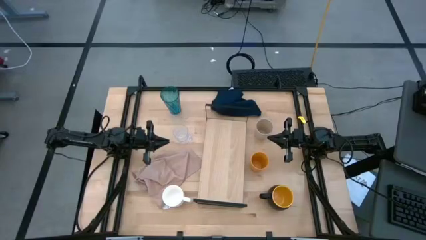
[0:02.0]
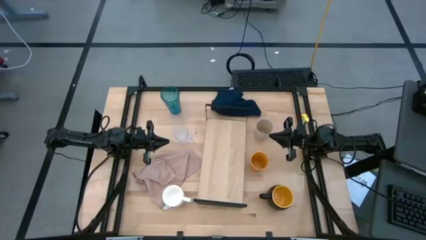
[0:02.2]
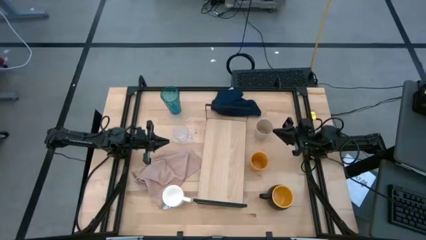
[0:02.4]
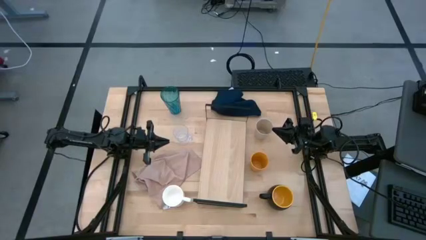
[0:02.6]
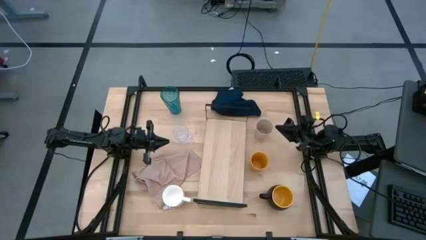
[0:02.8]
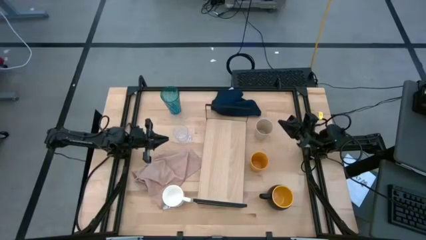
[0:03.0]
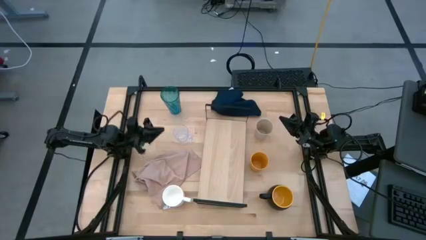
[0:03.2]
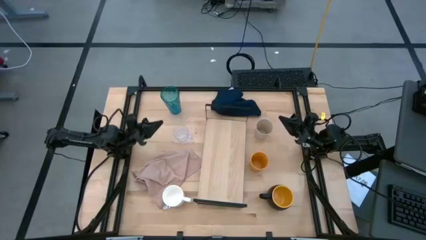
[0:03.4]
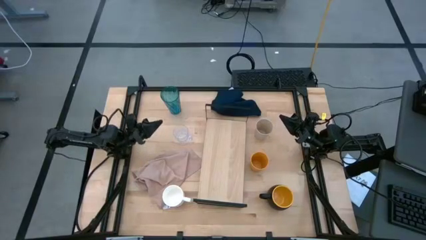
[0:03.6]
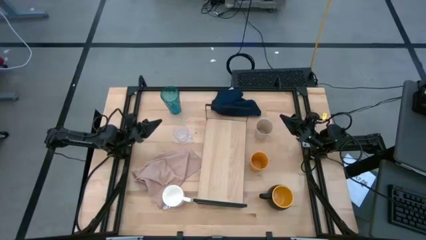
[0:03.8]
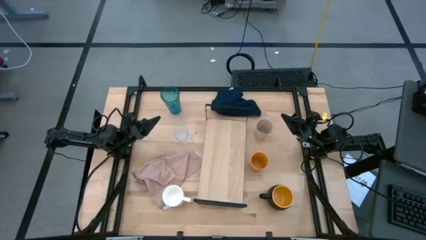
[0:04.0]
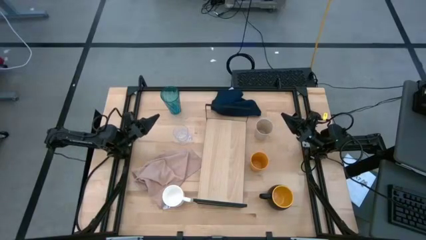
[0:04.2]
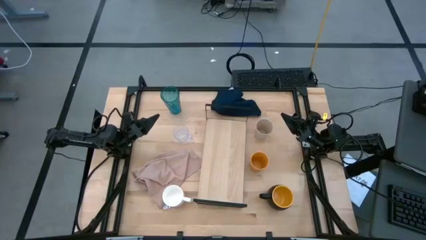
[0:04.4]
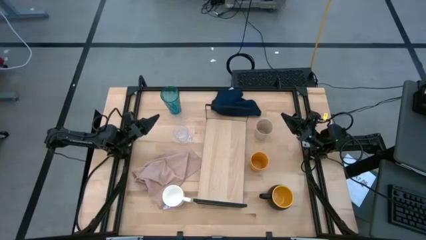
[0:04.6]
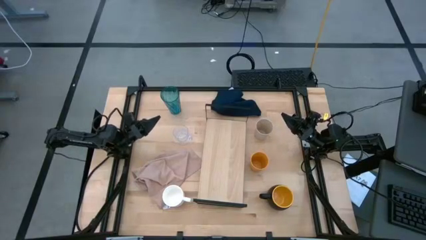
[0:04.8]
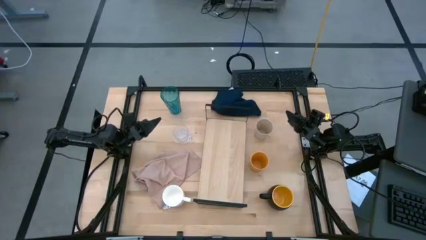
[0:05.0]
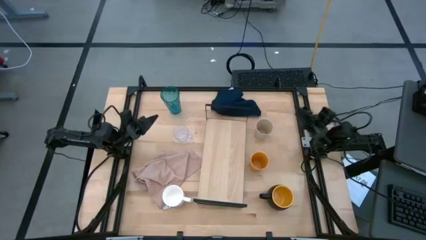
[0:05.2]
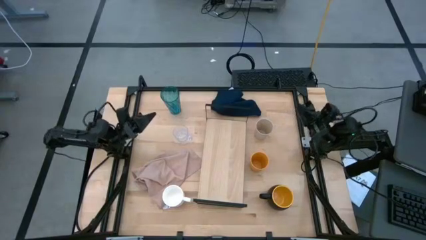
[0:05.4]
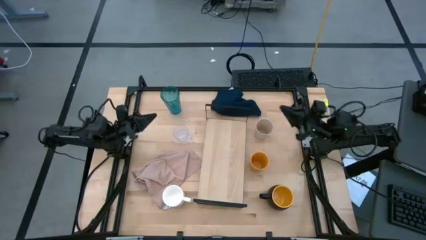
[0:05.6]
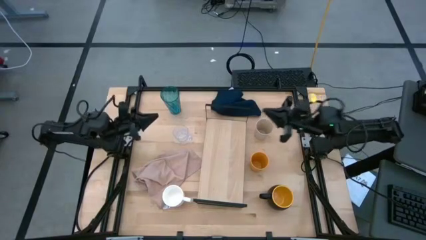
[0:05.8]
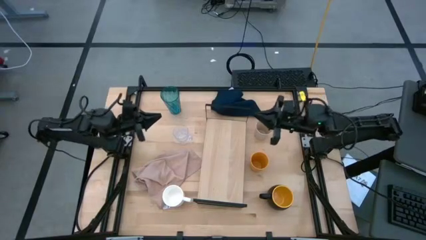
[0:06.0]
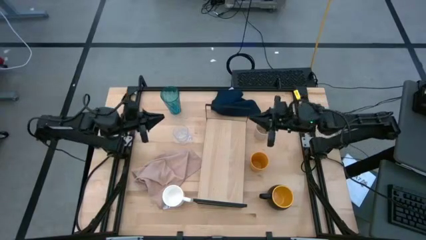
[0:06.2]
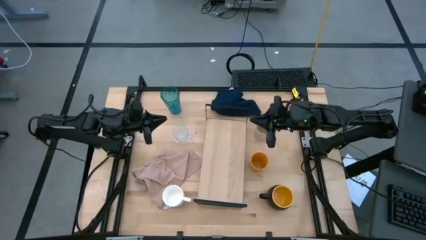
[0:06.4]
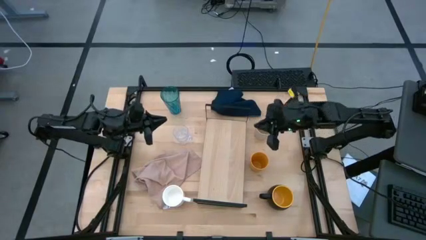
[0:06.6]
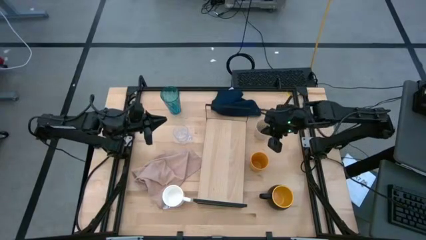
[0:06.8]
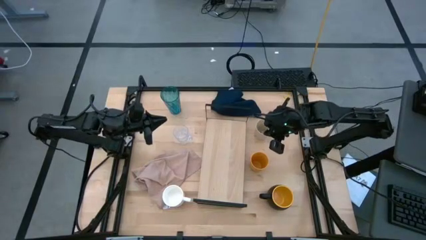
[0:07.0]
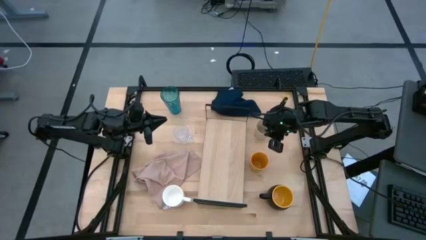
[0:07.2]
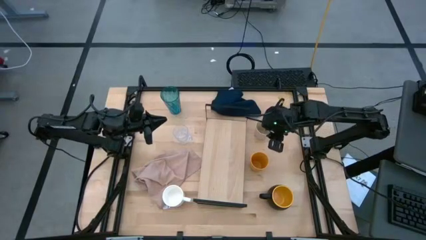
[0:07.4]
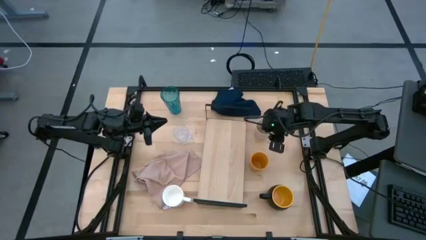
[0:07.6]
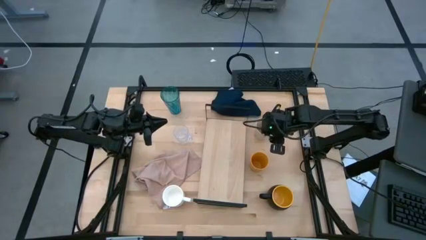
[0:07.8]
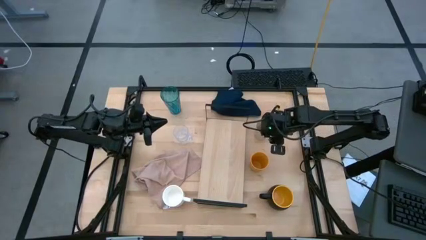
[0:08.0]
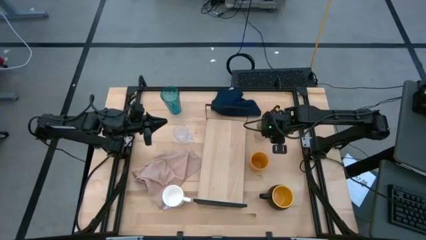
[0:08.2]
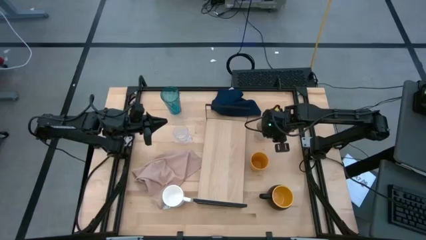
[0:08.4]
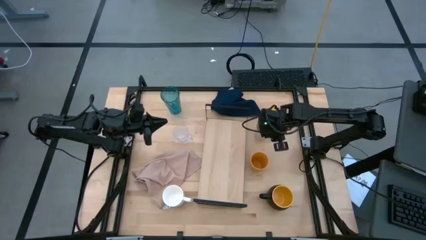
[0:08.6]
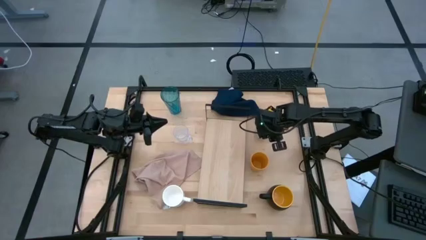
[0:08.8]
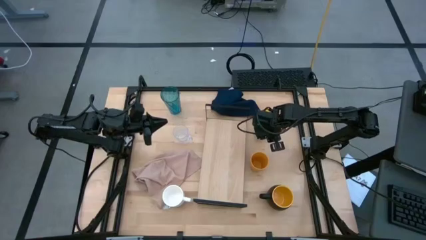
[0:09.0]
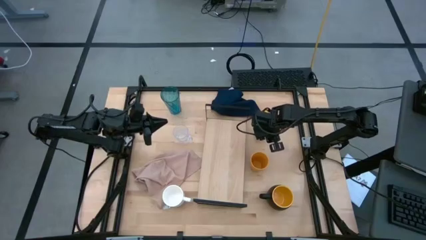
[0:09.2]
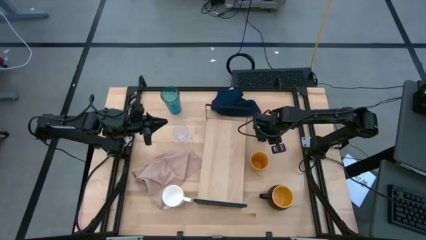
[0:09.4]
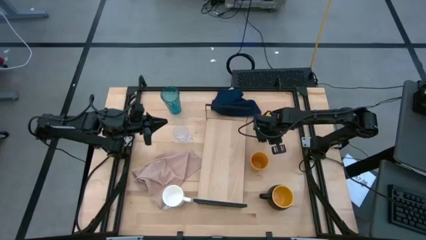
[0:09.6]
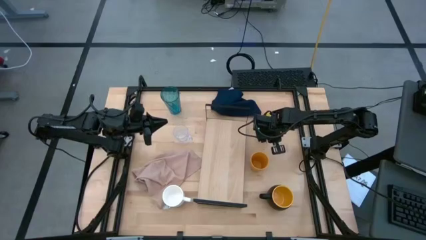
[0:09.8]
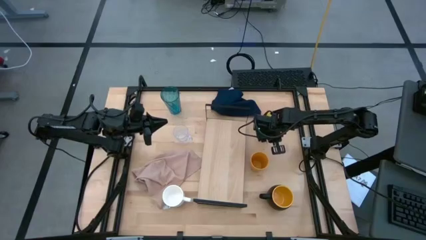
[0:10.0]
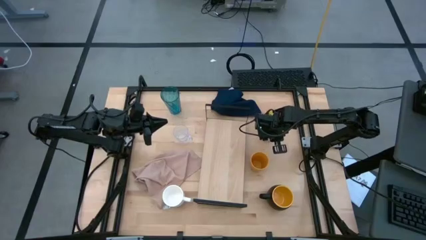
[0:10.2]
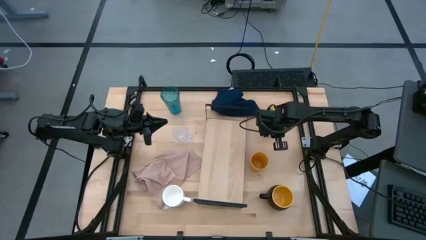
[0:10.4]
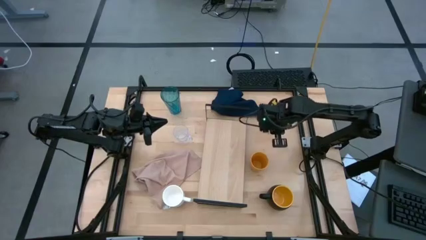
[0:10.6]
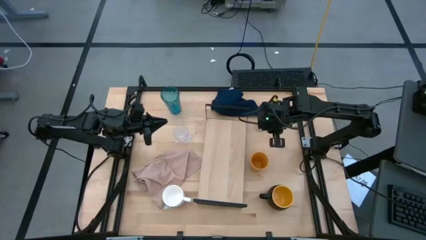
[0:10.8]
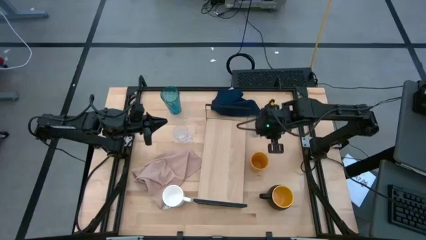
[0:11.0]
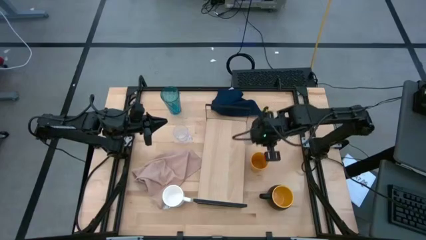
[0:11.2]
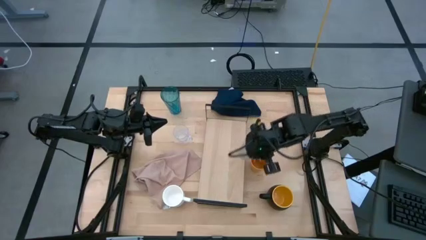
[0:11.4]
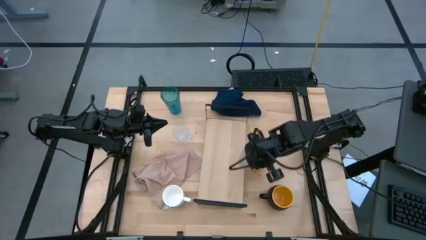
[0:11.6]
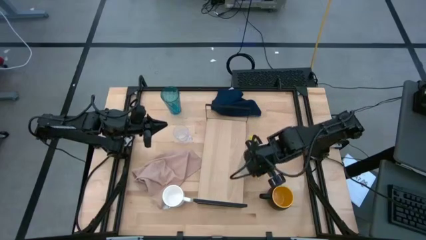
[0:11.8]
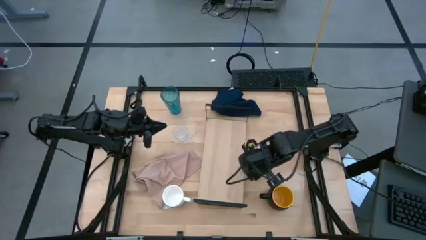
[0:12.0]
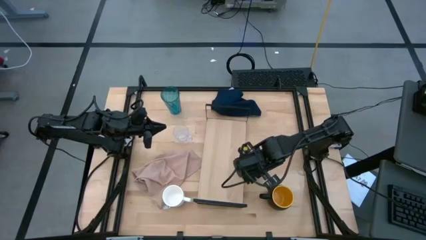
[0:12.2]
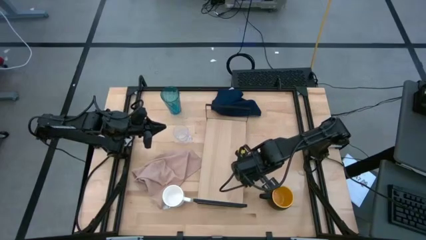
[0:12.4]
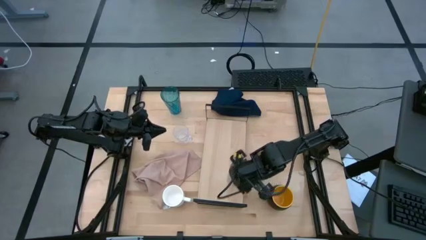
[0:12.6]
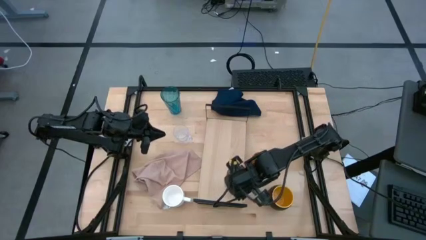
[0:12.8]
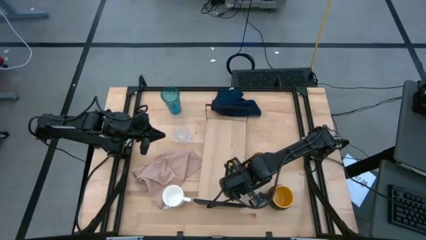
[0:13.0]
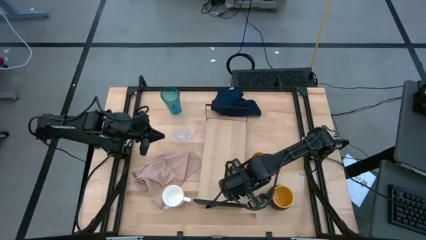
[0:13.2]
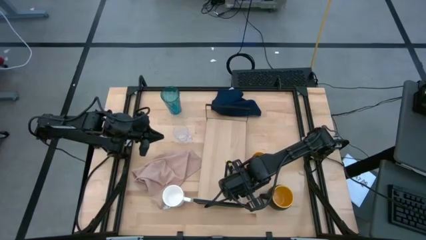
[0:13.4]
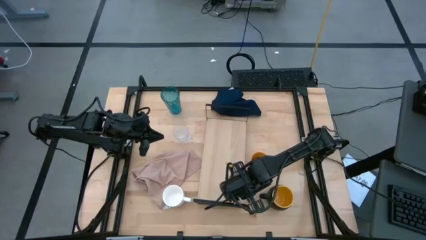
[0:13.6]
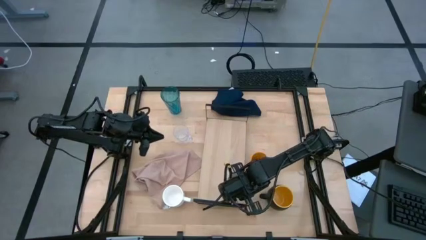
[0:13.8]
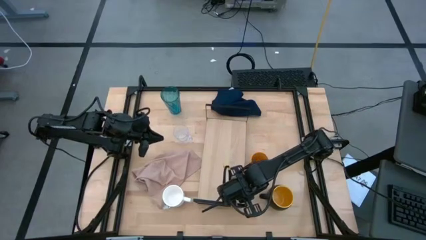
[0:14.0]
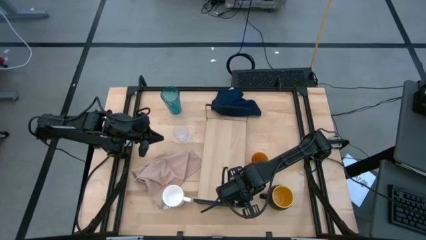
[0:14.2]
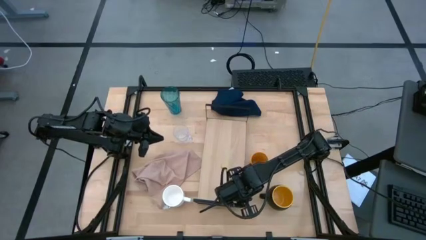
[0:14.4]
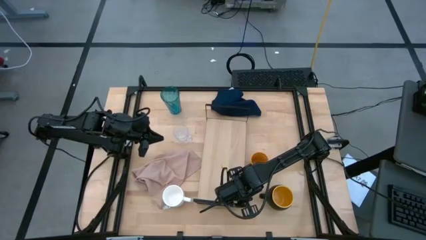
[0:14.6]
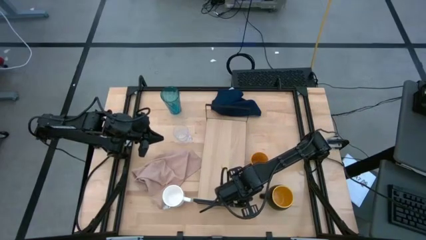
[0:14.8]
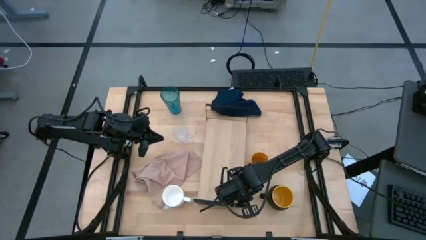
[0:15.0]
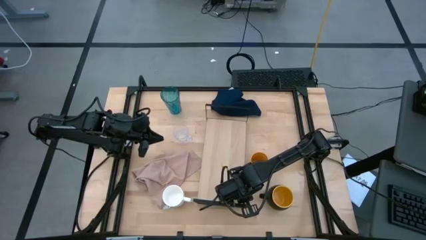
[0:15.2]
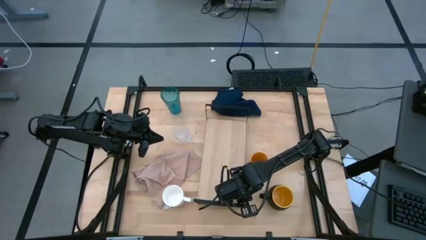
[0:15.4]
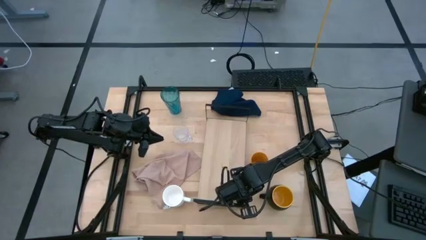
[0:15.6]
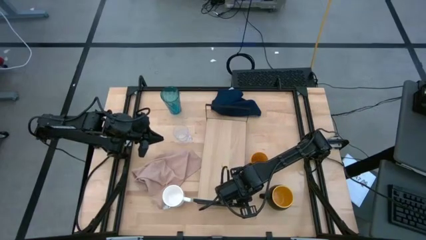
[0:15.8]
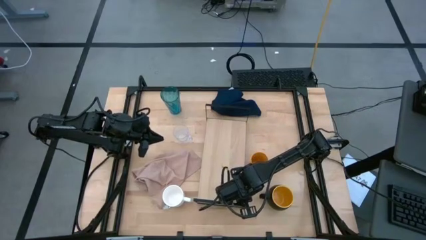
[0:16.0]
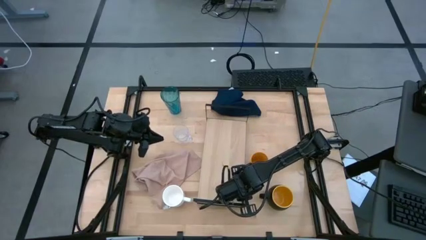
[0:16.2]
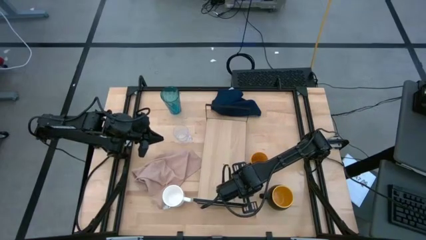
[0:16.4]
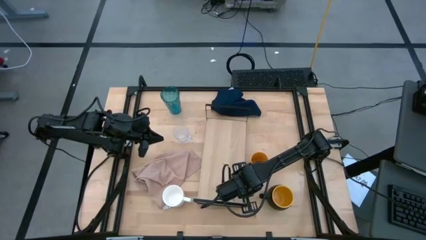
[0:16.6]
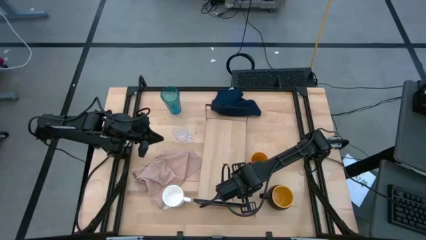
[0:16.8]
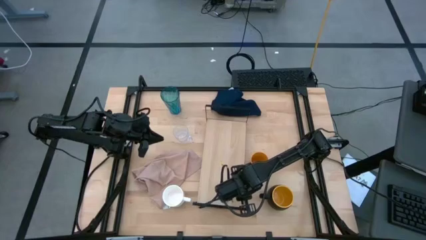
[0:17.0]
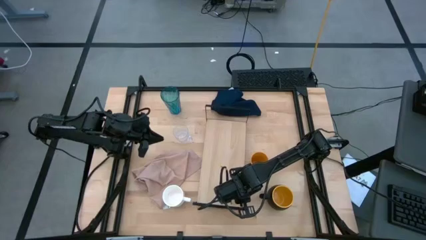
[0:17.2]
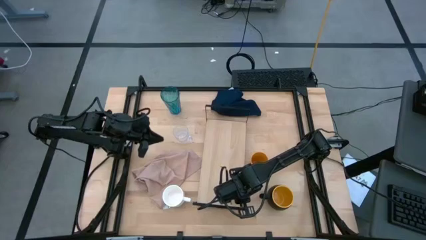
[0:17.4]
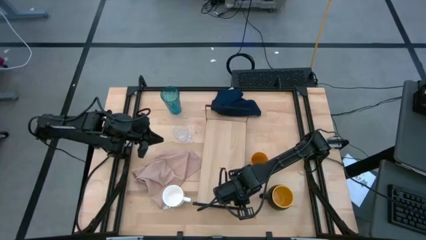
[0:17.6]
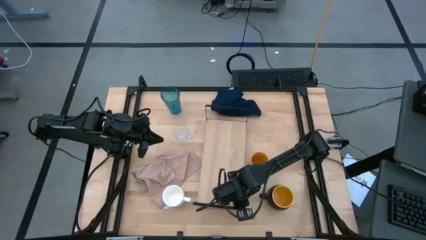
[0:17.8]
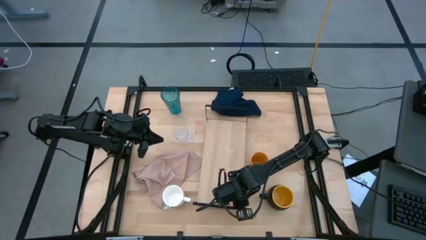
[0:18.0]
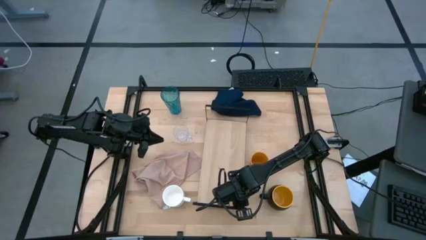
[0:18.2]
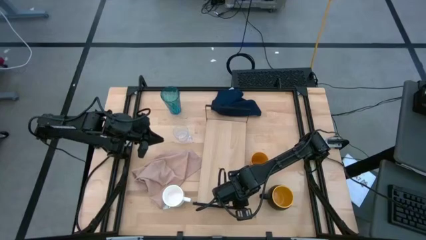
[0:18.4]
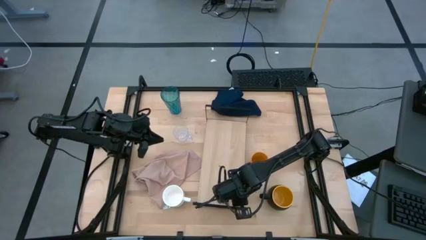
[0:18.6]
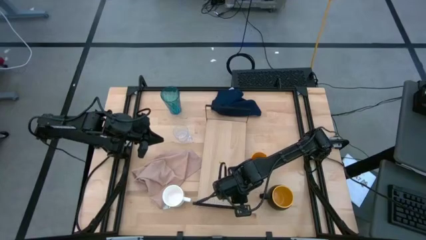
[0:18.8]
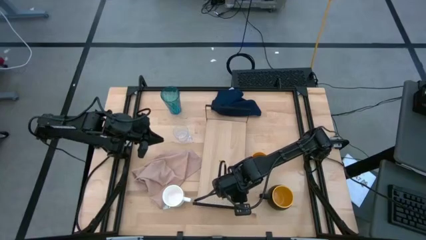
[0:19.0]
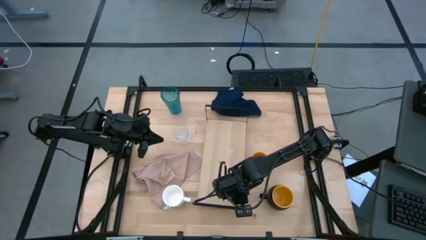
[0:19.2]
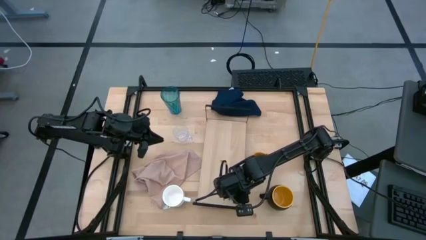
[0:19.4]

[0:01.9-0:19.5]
Task: Stack small to large cups/mugs on shelf
Put the white cup on the shelf
